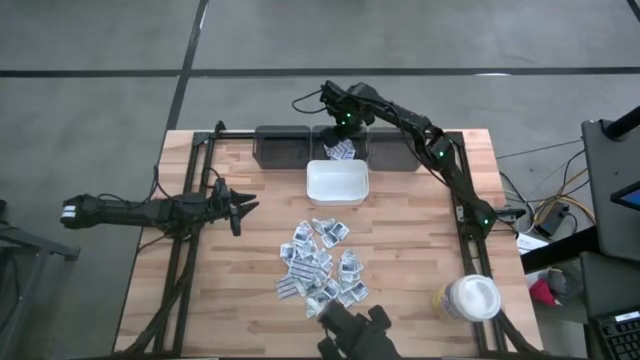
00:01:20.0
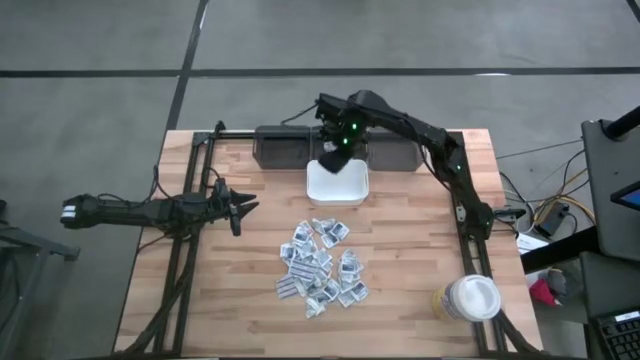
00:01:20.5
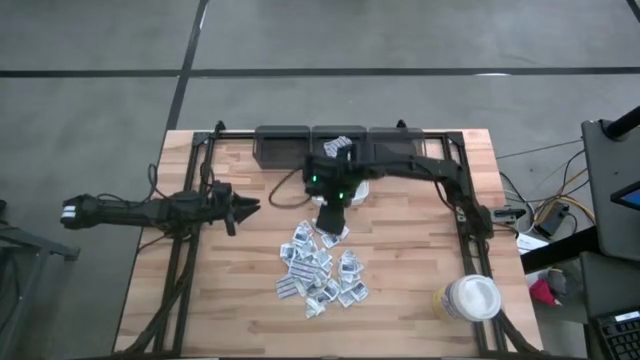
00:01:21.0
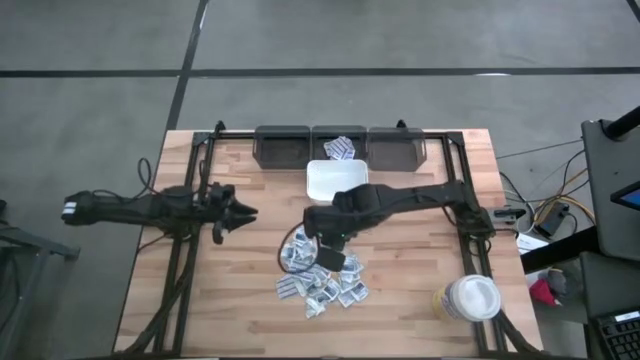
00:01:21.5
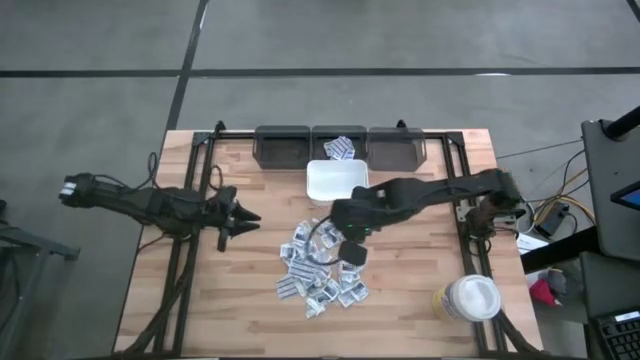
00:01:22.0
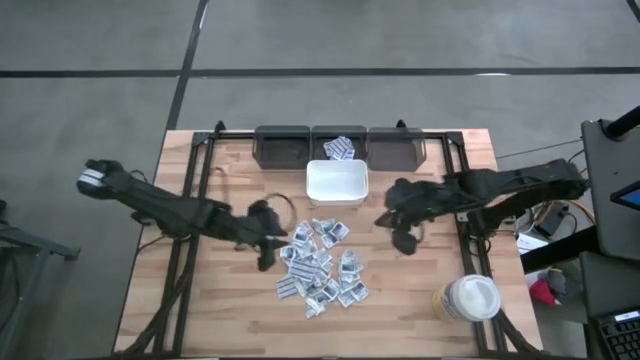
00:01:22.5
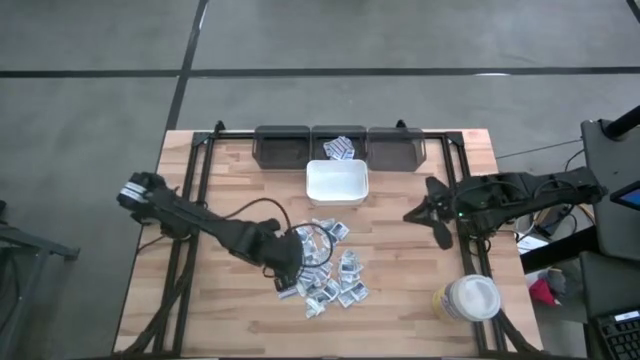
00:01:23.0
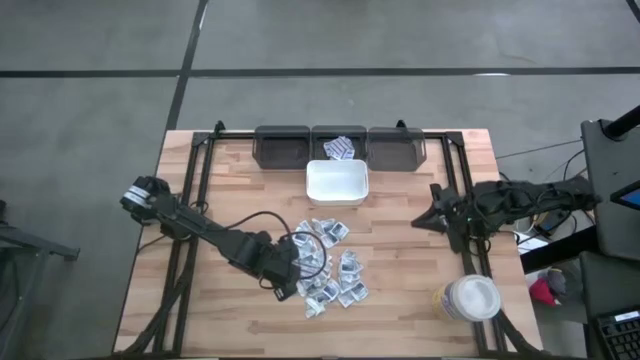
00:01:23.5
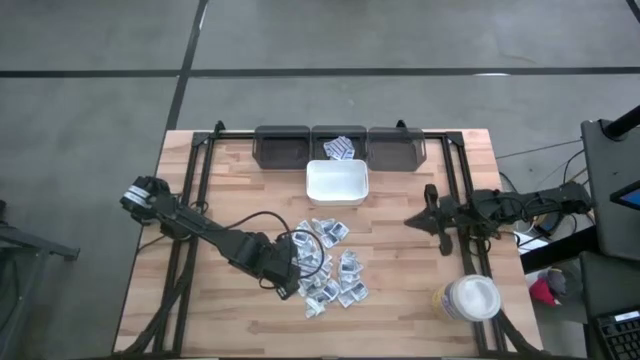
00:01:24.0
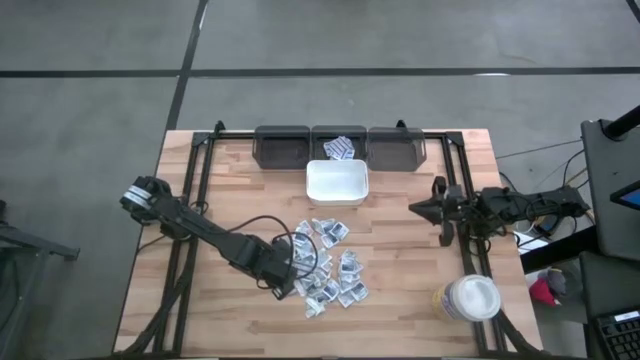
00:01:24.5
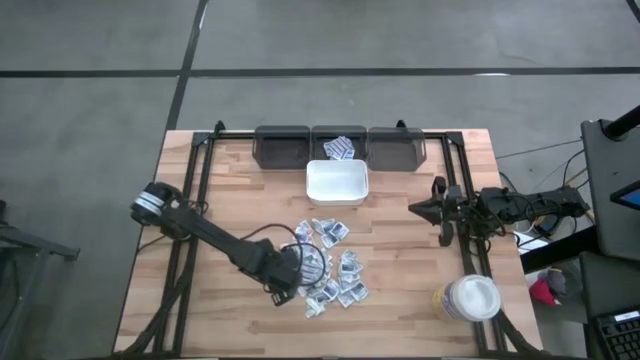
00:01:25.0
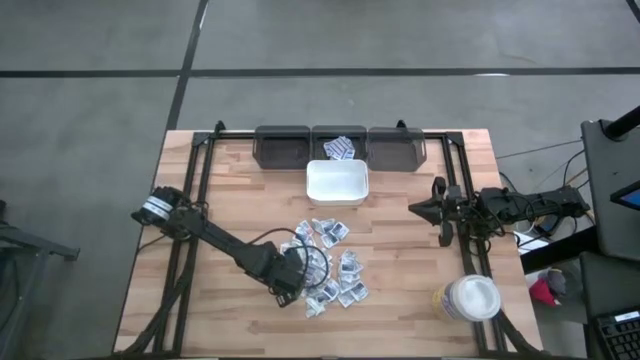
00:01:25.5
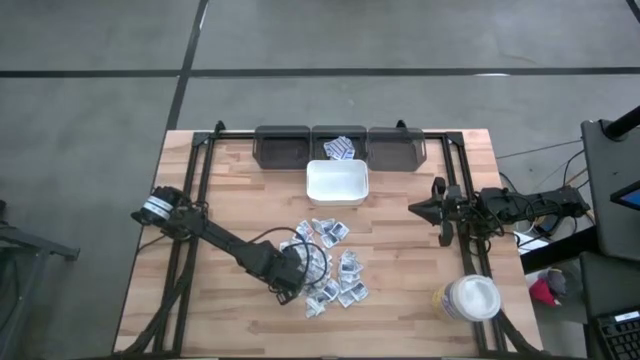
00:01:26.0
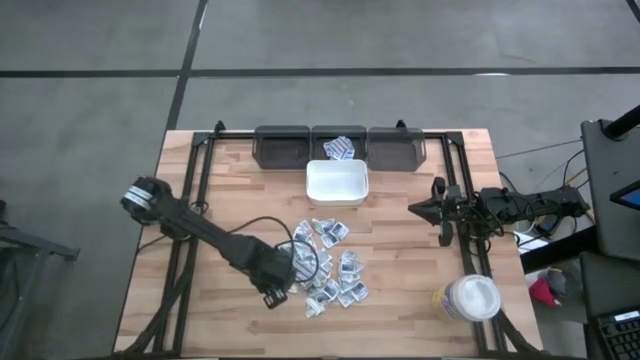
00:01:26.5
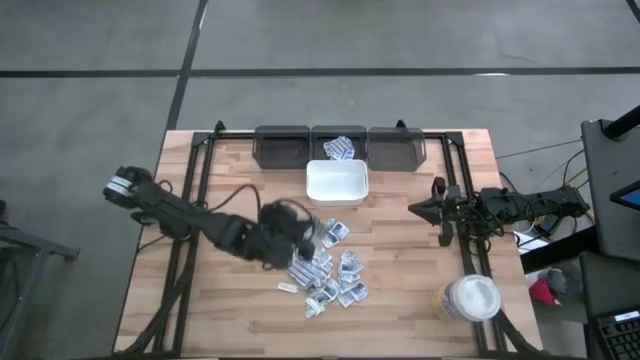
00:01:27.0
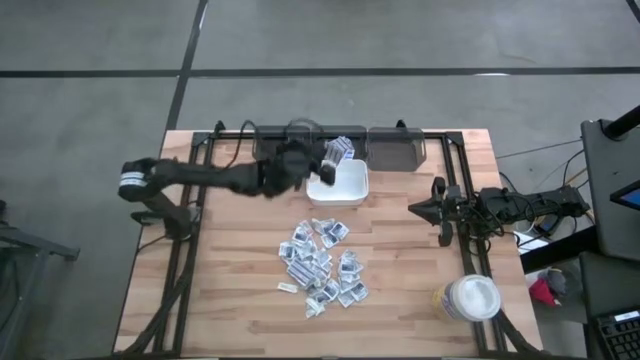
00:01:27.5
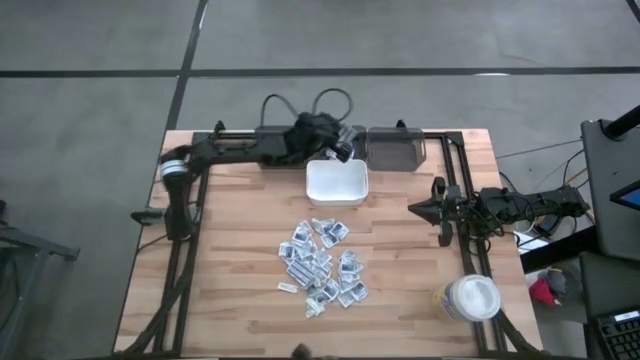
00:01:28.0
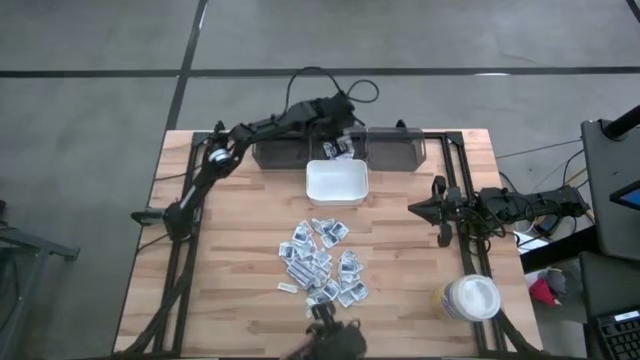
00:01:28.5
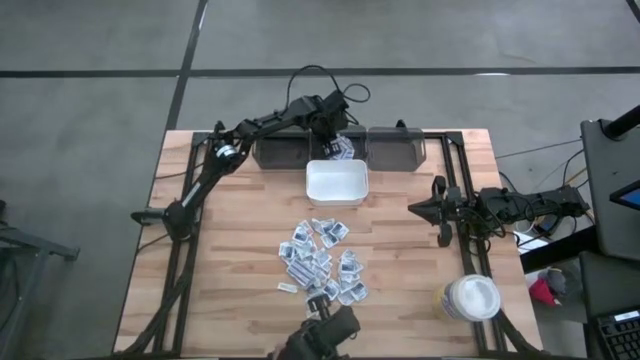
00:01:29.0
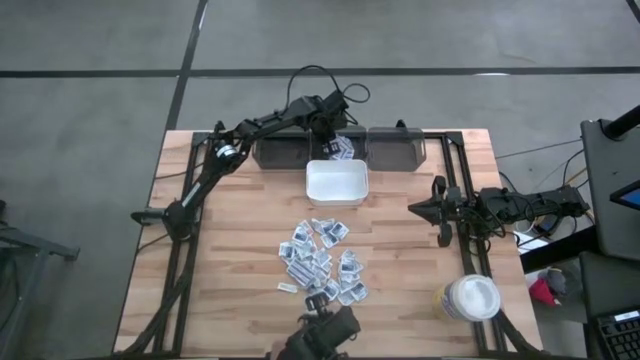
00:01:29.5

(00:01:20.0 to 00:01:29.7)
Task: Pick & Place First Aid Supplies
Put the blue bandage into the middle black bin

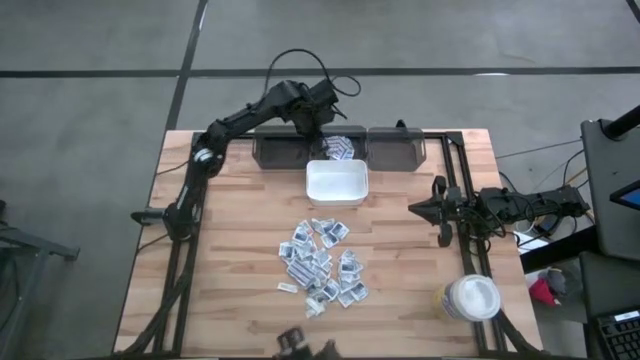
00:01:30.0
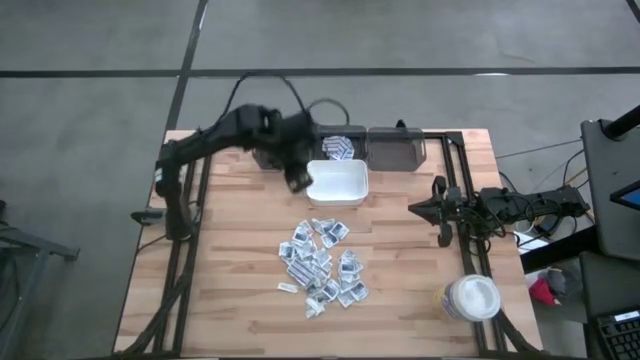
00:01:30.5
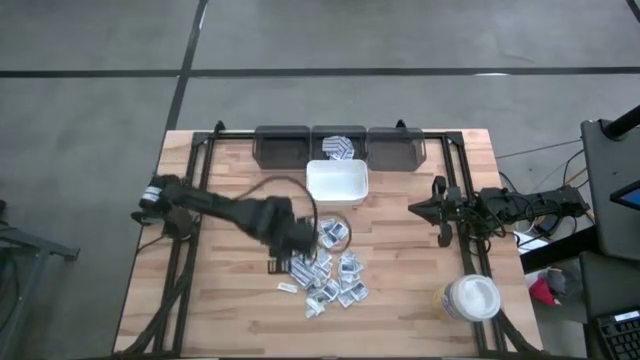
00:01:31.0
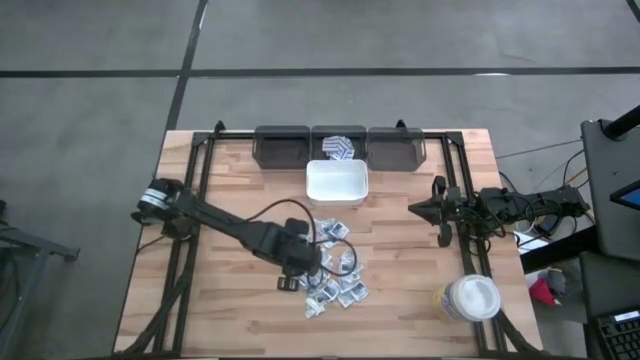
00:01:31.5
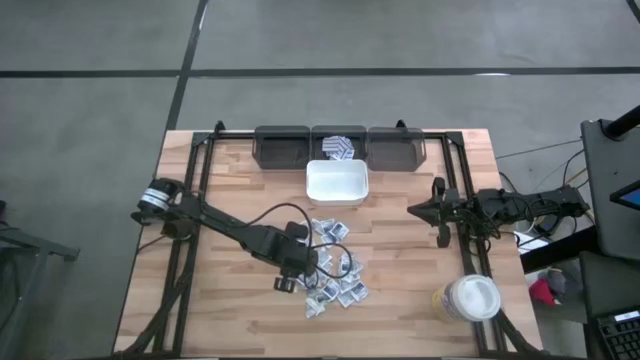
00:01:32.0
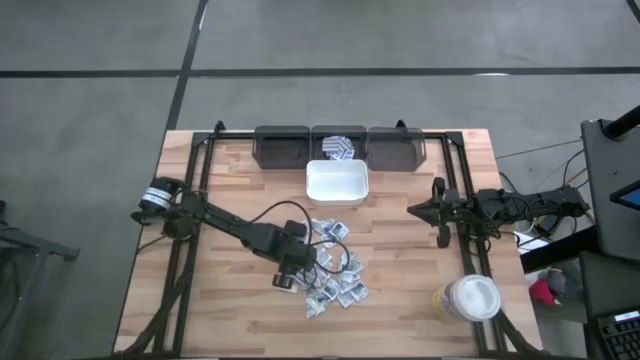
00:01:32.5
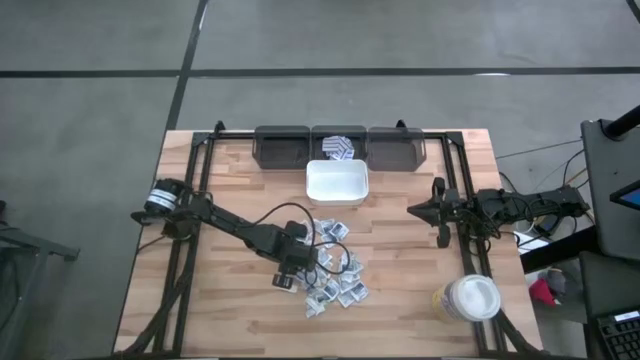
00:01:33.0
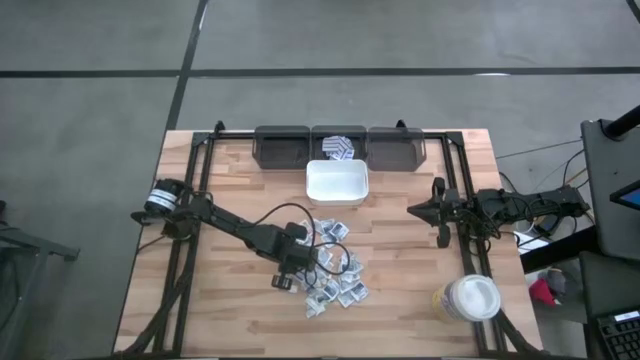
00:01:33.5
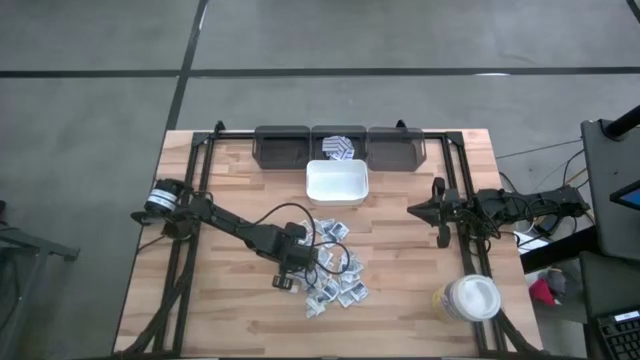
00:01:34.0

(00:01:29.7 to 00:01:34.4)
Put the blue bandage into the middle black bin

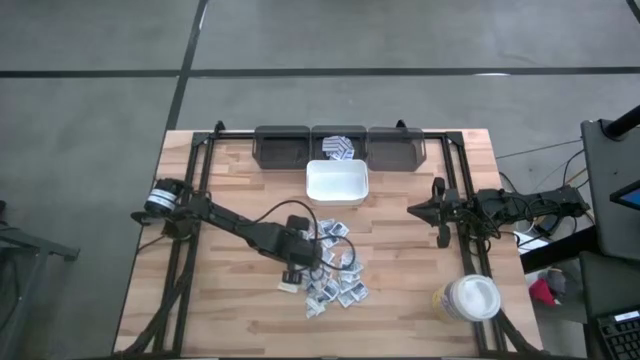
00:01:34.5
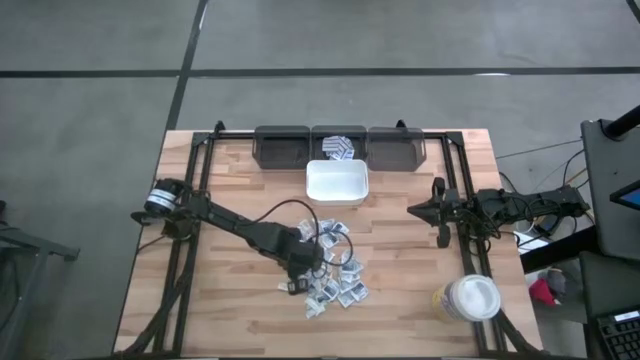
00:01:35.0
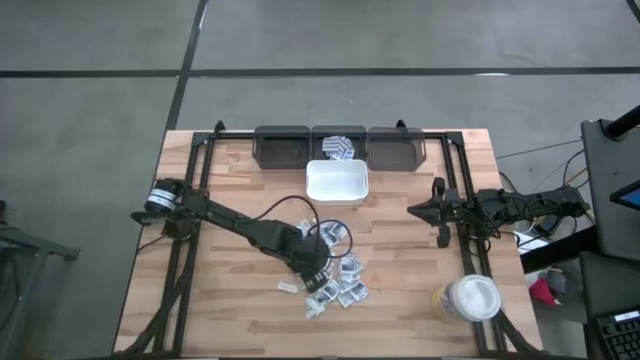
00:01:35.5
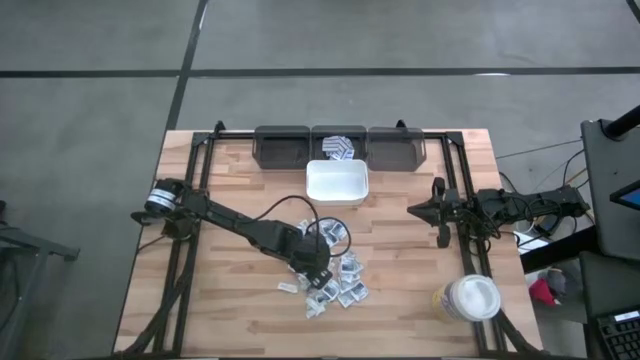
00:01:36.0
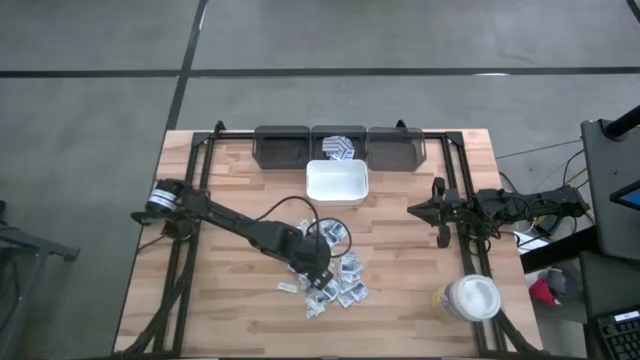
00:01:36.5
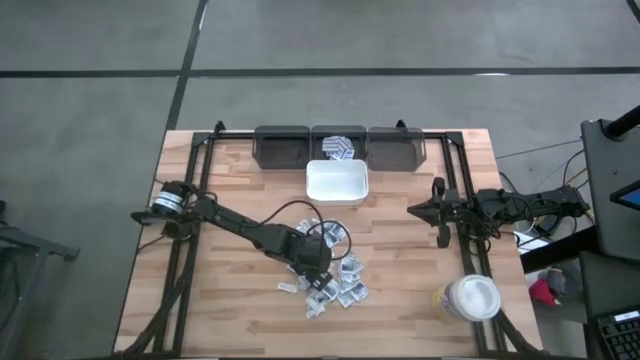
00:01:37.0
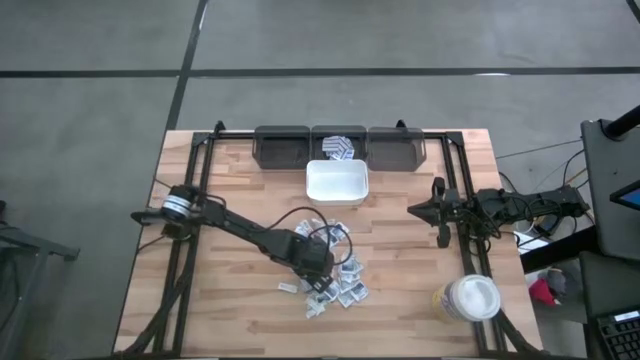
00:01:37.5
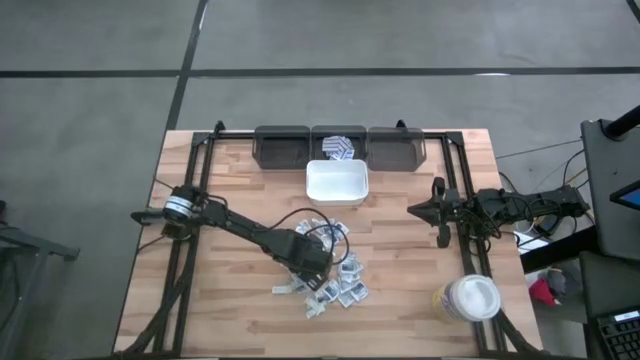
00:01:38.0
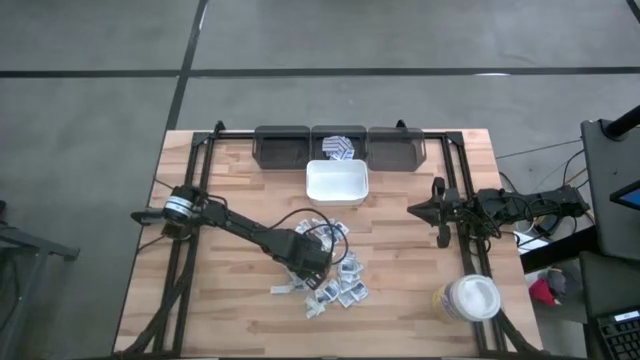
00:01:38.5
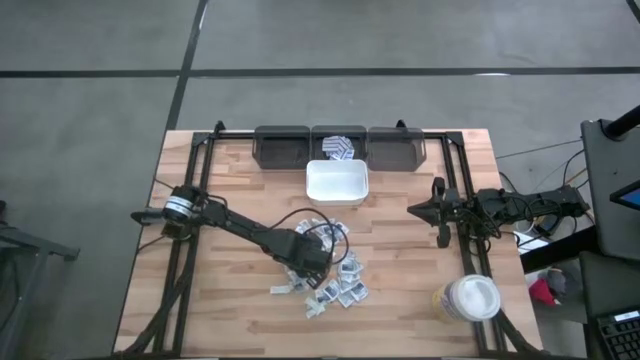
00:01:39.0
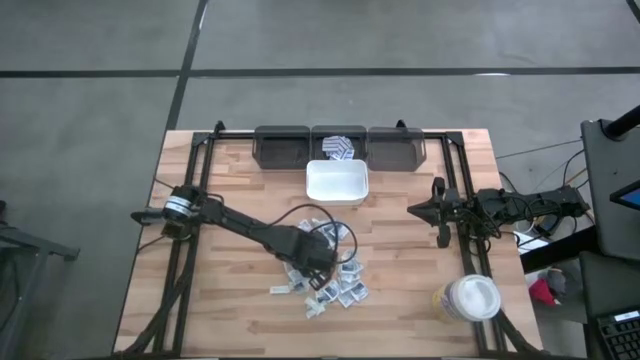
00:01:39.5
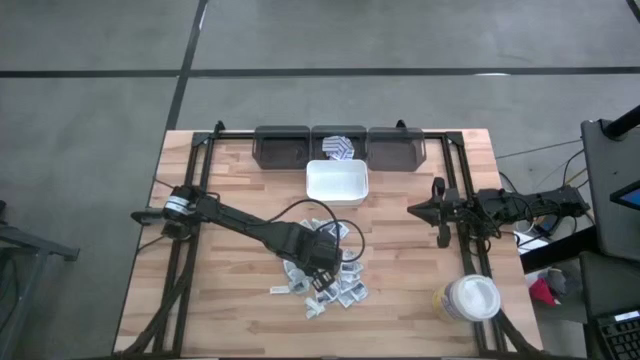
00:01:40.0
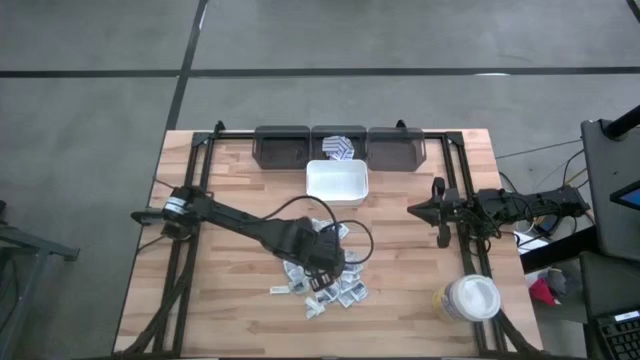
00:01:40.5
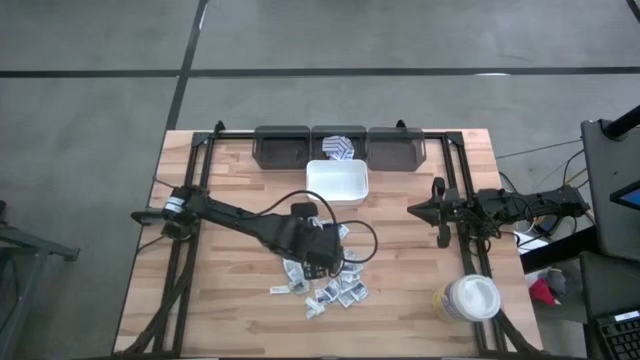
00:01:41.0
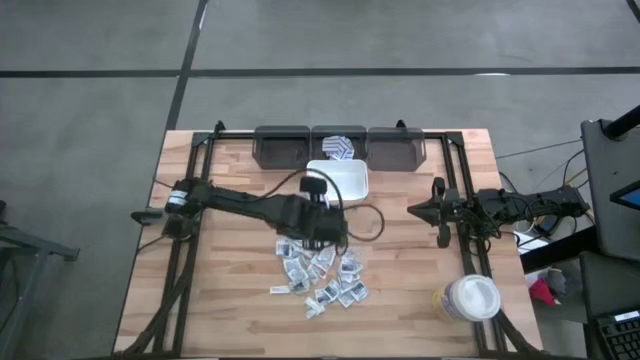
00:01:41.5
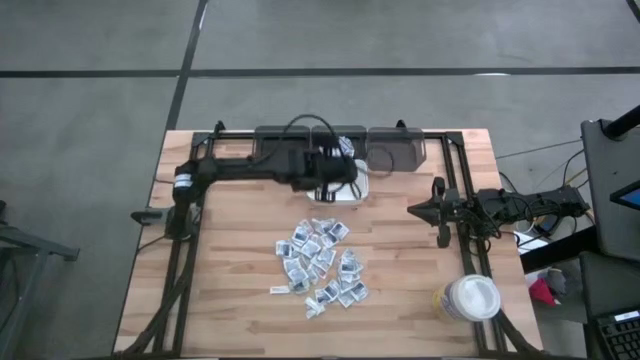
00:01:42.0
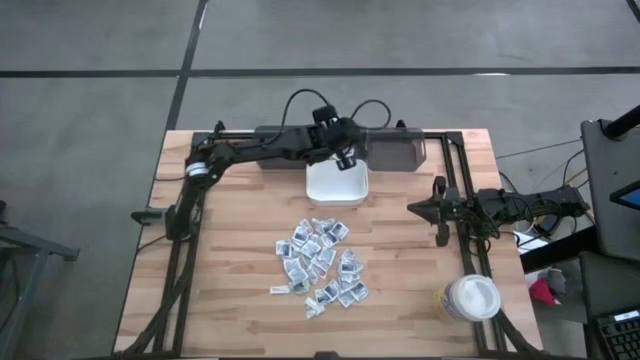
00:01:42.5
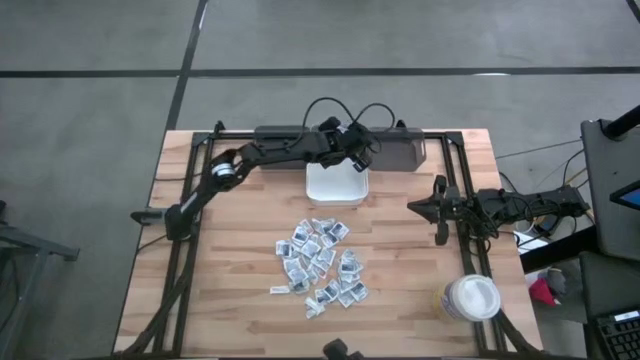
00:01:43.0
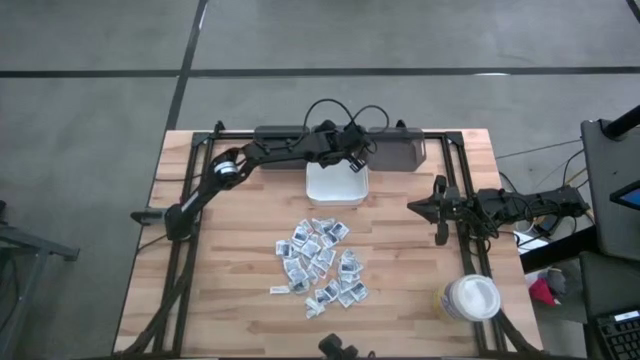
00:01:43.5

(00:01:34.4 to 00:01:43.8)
Put the blue bandage into the middle black bin
